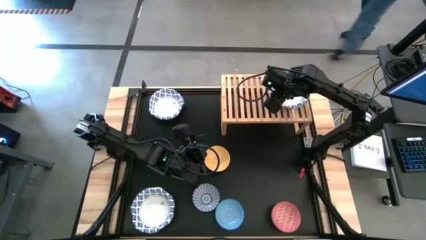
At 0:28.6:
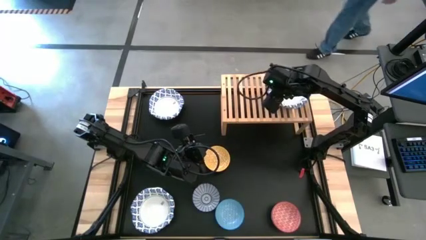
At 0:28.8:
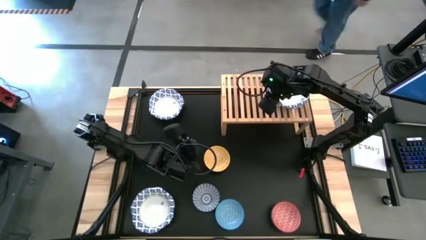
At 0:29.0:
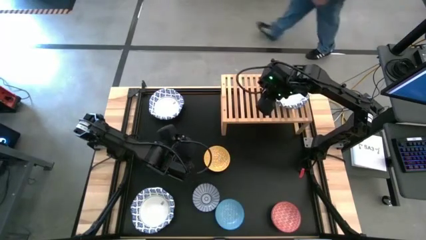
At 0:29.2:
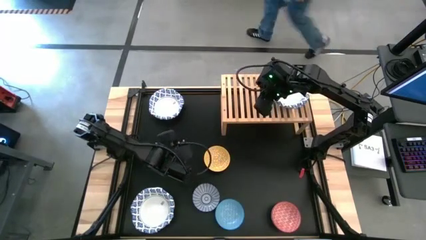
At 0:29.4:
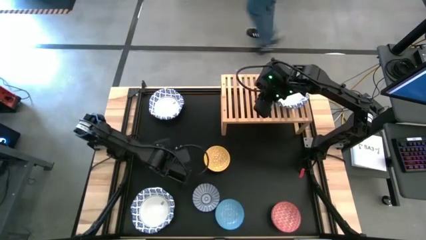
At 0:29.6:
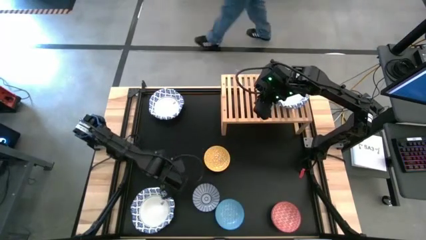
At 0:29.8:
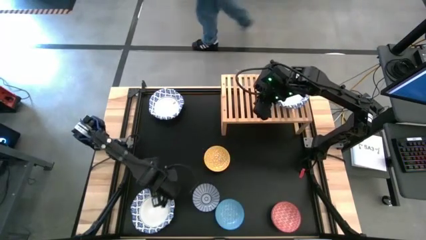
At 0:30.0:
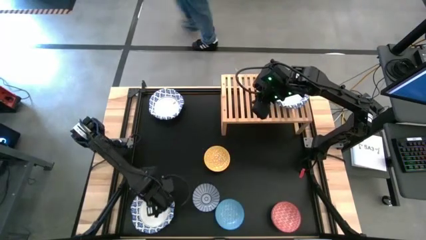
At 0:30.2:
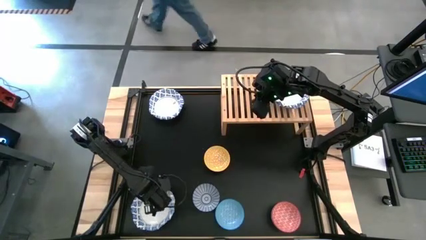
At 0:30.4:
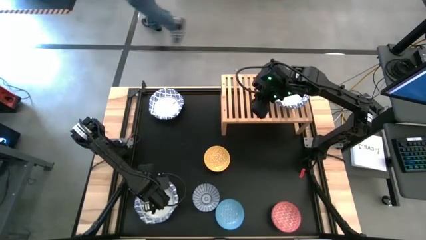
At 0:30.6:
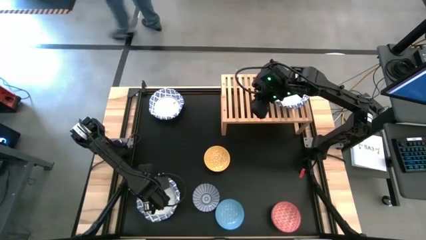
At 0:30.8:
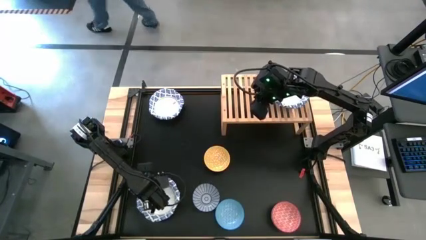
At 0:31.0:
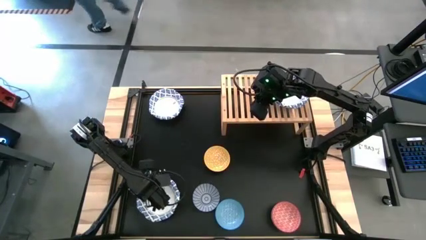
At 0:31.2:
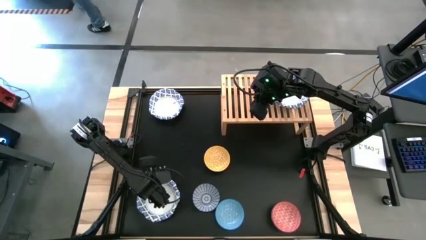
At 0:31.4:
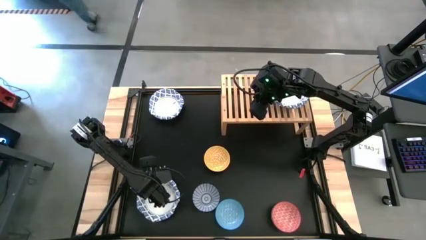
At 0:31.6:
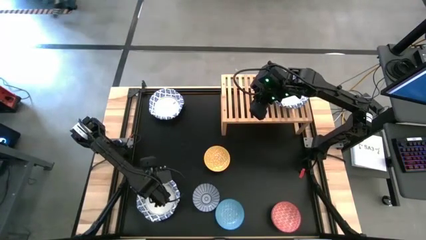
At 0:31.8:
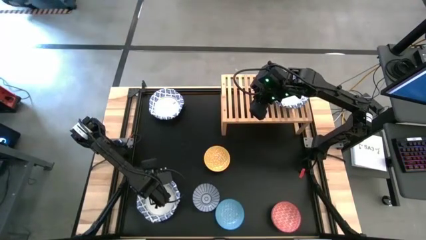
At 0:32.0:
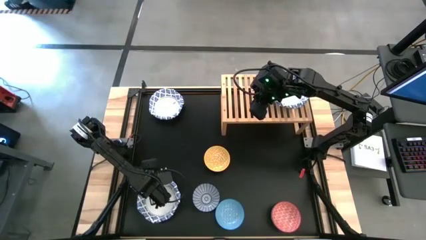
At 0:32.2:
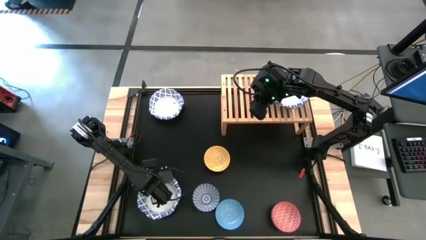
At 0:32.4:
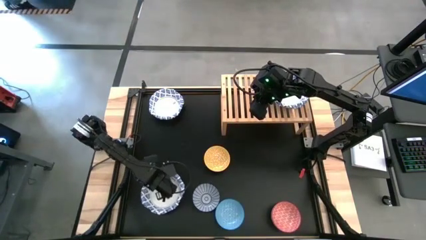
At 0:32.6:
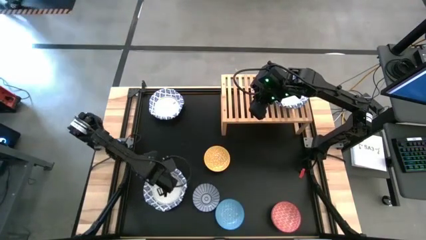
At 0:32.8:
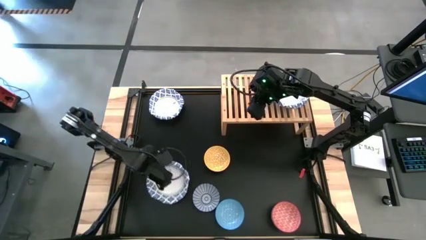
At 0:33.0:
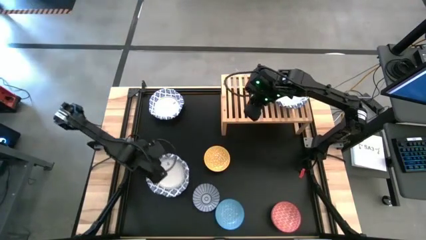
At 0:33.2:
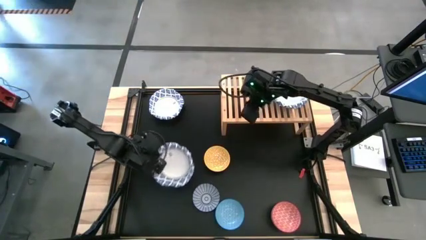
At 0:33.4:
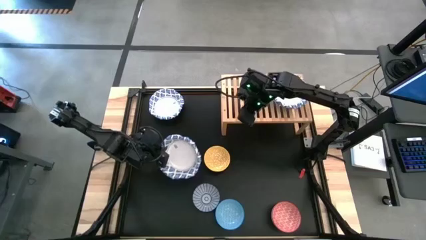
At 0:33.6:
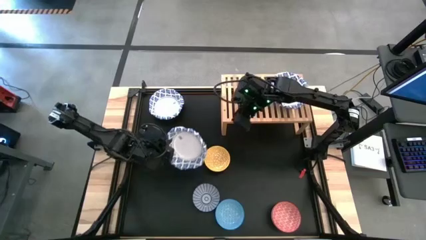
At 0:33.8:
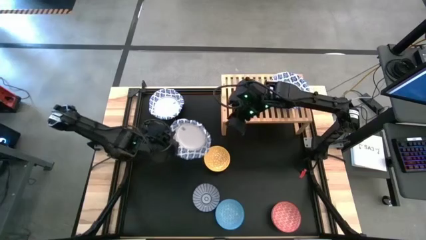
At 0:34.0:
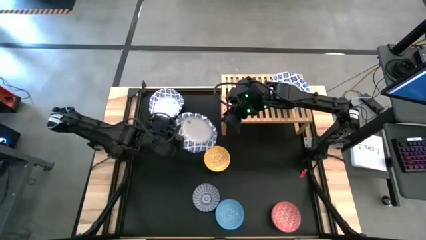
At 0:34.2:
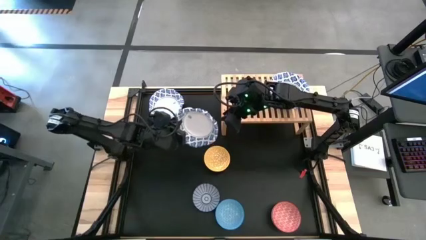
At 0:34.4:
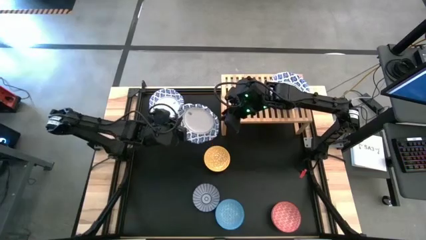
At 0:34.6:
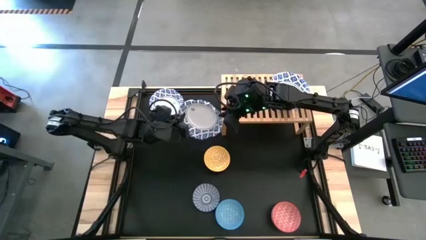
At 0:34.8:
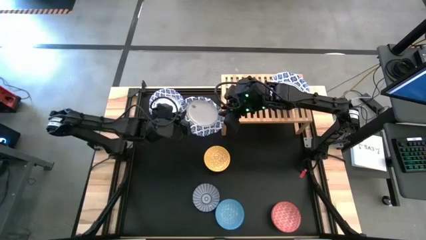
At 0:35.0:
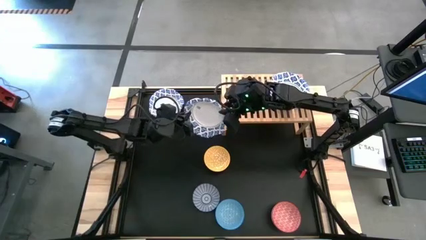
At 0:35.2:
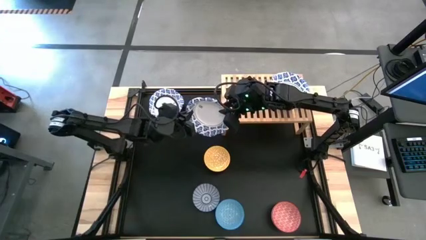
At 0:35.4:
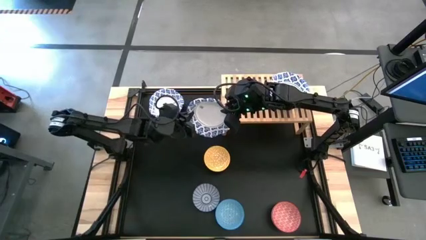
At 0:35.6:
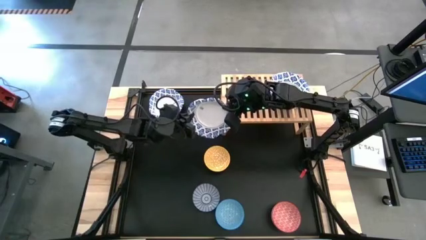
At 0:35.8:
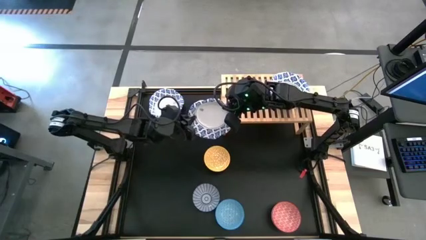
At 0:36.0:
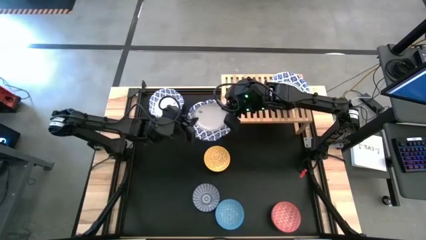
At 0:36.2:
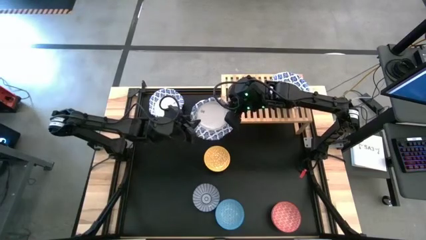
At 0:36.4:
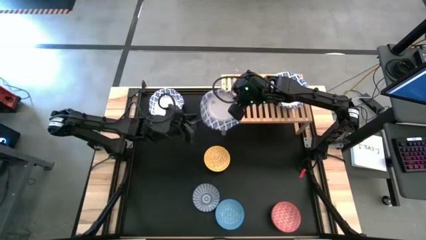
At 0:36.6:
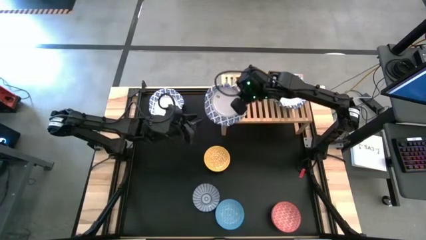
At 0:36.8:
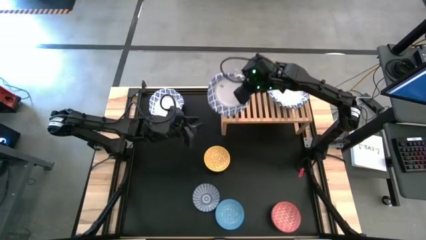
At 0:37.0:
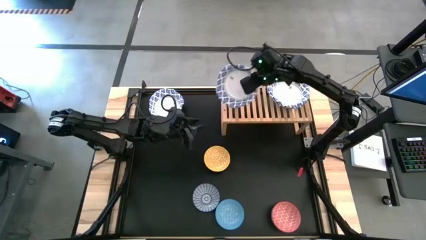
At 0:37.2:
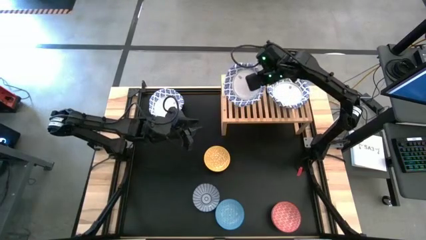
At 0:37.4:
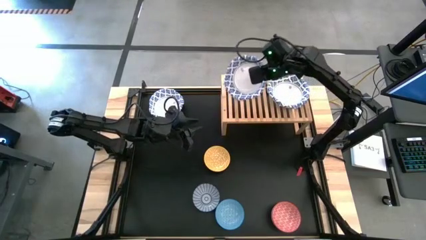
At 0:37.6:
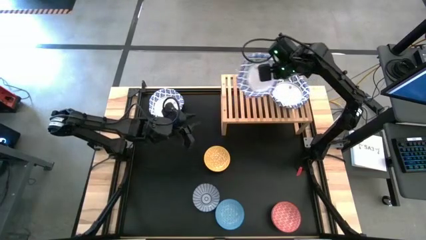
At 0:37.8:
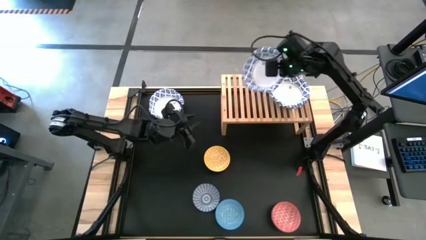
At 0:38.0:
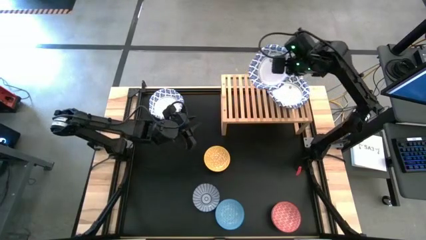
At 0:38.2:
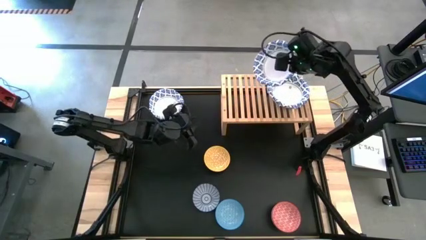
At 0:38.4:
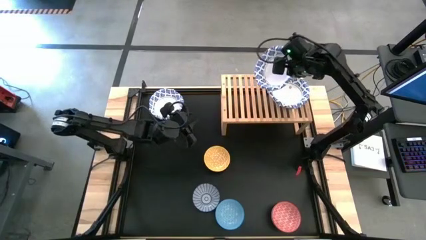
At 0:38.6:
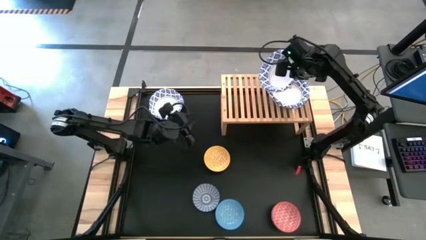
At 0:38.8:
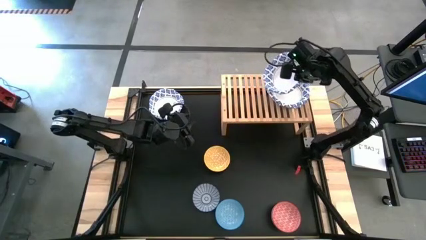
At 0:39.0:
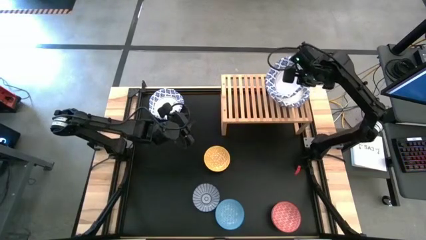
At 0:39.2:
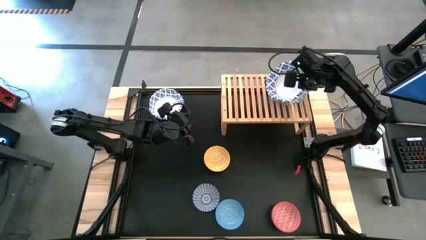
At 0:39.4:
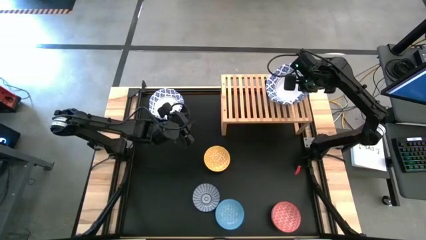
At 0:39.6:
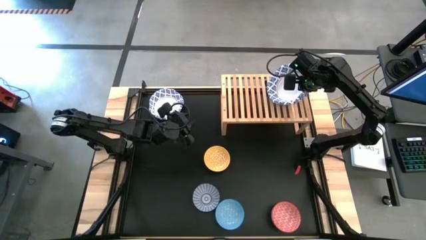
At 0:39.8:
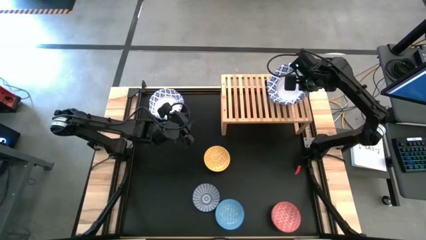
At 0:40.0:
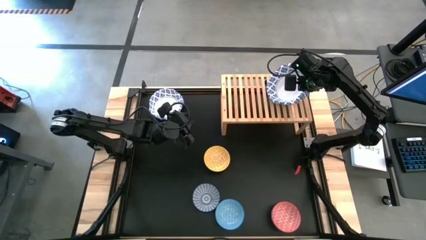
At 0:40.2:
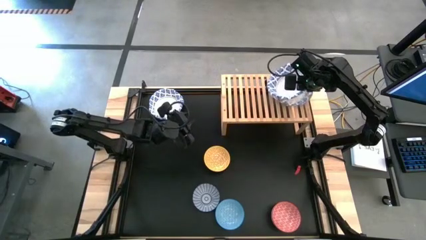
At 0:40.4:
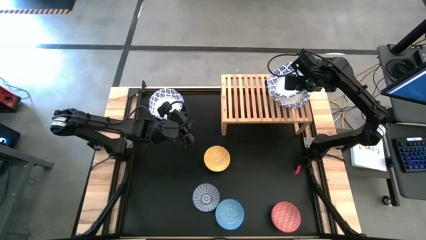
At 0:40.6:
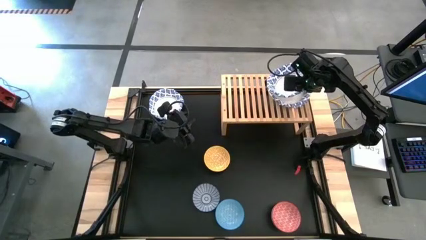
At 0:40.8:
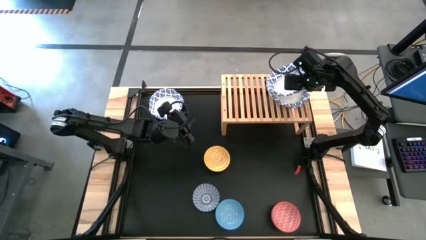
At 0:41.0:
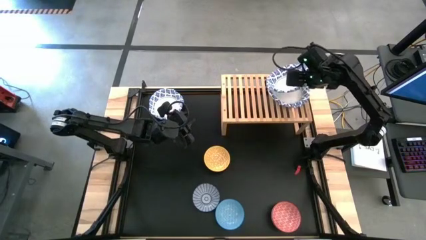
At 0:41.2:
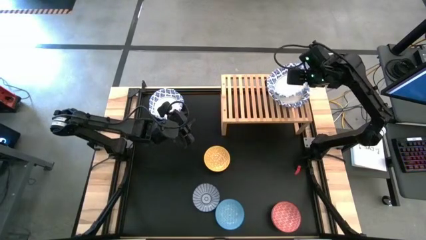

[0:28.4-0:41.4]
Task: Place and stack bowls onto a shelf
Stack the bottom white bowl on top of the other white bowl on the shelf
